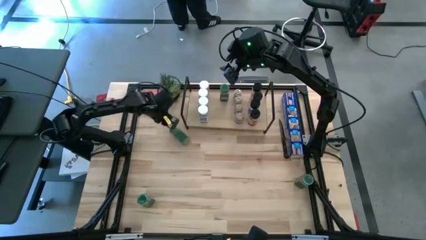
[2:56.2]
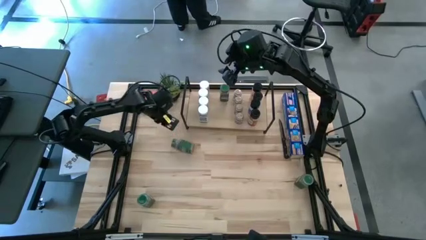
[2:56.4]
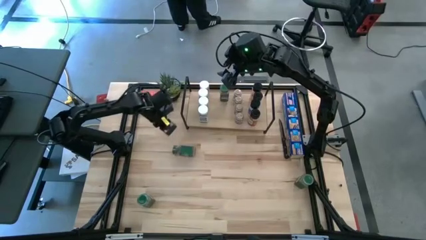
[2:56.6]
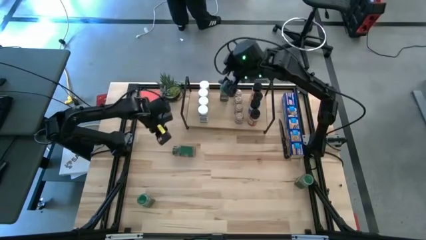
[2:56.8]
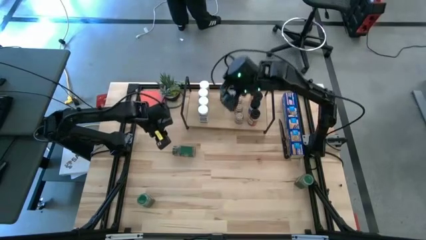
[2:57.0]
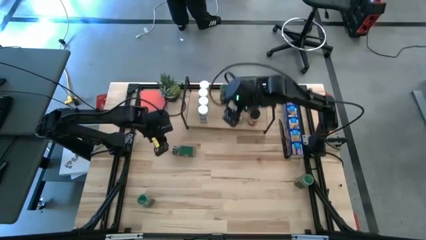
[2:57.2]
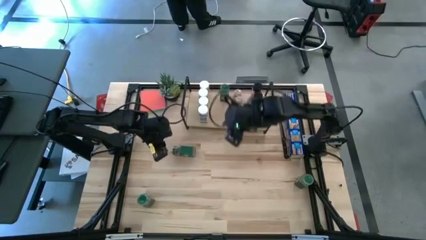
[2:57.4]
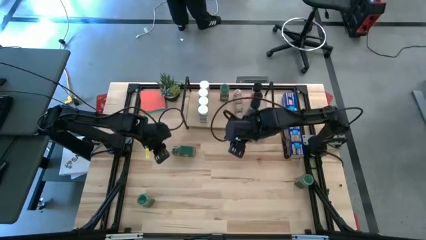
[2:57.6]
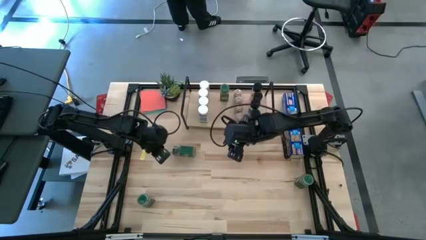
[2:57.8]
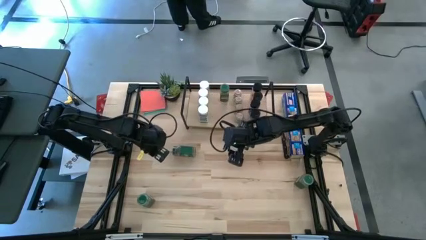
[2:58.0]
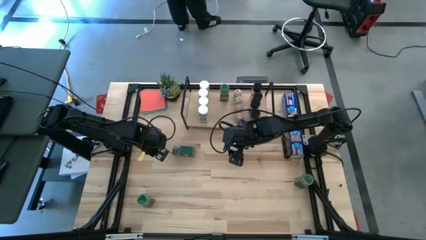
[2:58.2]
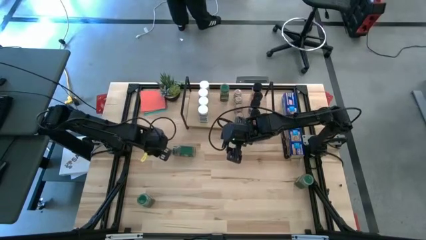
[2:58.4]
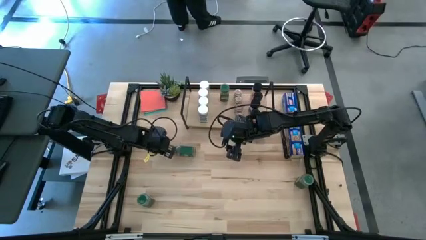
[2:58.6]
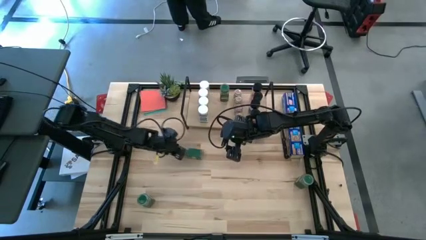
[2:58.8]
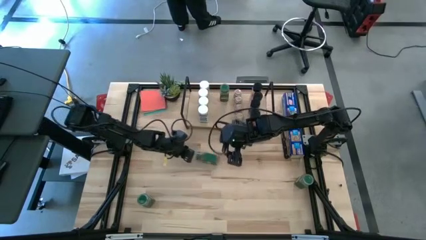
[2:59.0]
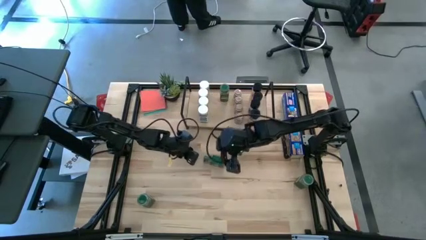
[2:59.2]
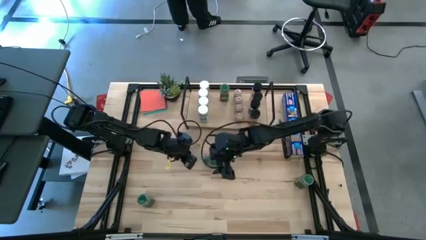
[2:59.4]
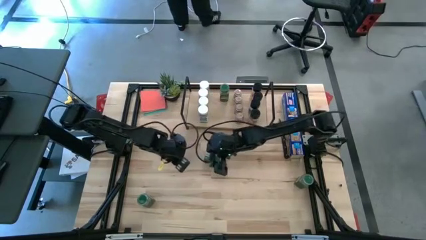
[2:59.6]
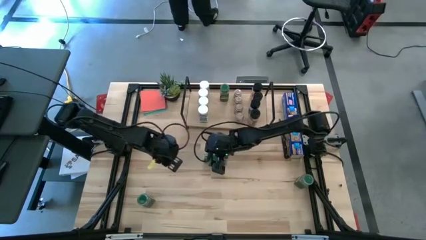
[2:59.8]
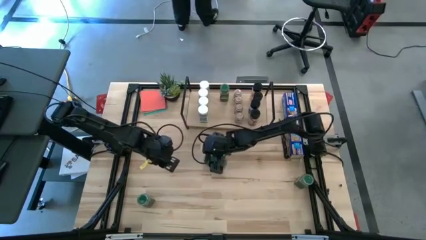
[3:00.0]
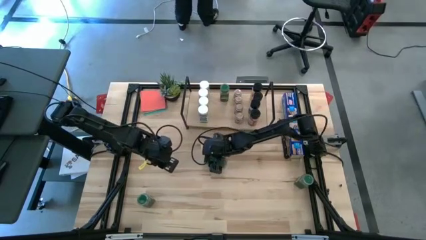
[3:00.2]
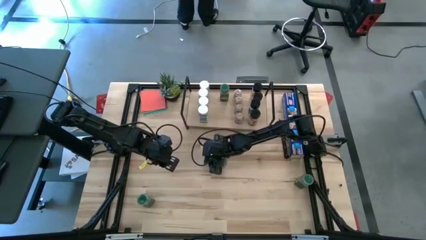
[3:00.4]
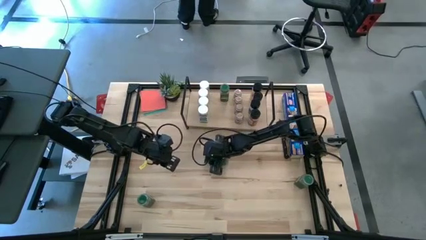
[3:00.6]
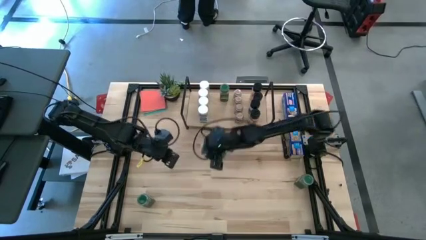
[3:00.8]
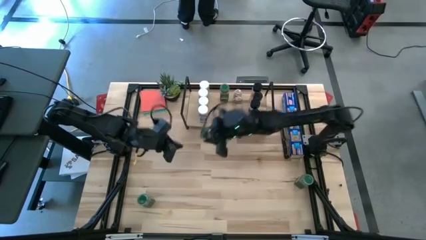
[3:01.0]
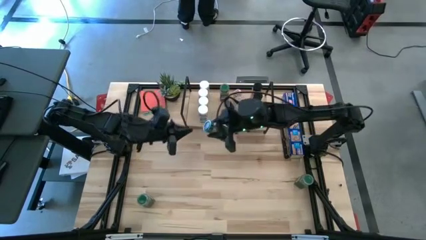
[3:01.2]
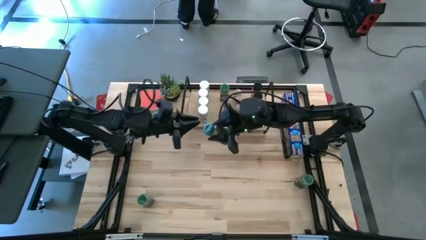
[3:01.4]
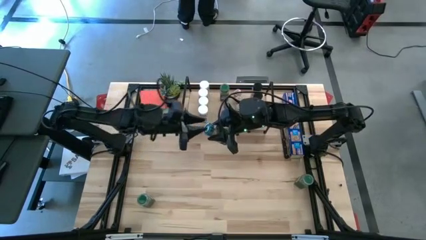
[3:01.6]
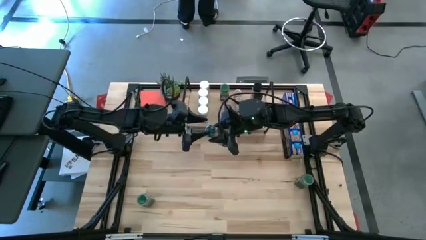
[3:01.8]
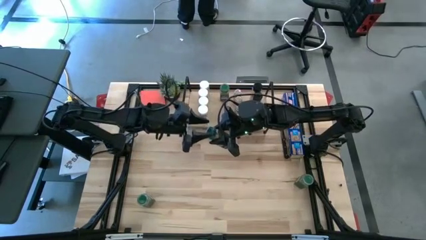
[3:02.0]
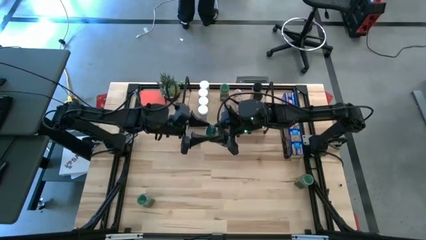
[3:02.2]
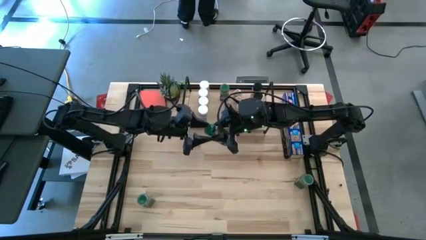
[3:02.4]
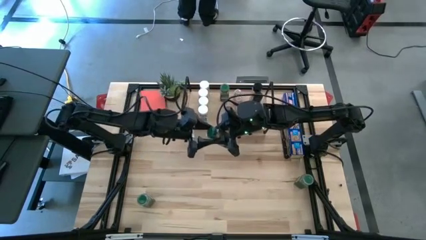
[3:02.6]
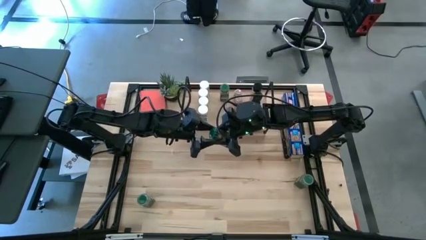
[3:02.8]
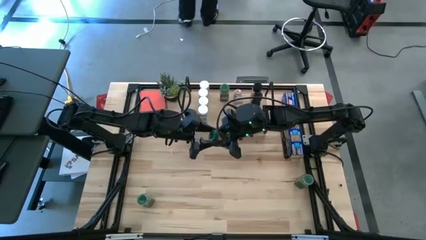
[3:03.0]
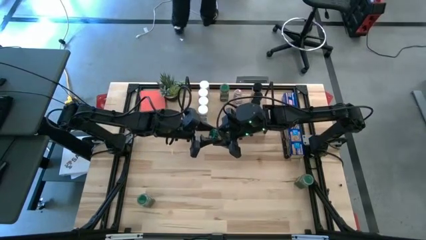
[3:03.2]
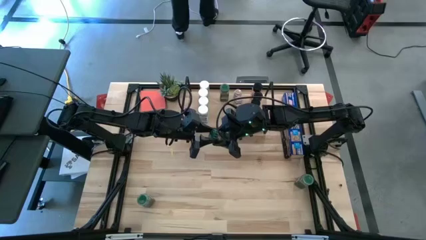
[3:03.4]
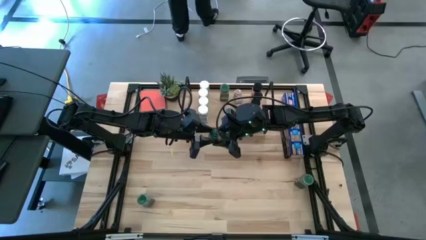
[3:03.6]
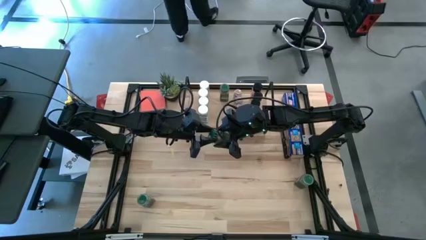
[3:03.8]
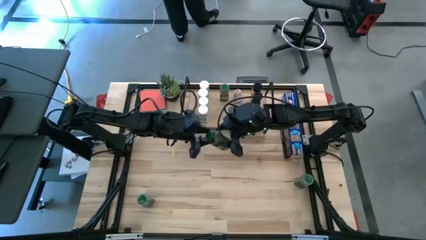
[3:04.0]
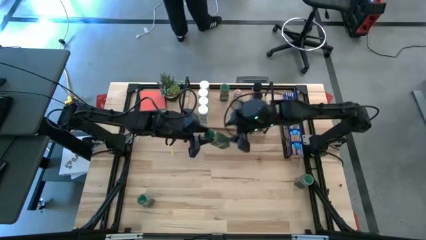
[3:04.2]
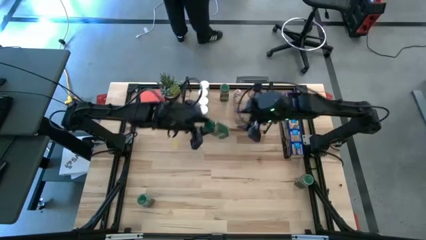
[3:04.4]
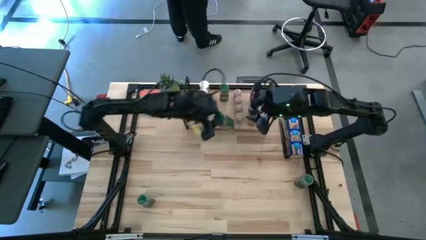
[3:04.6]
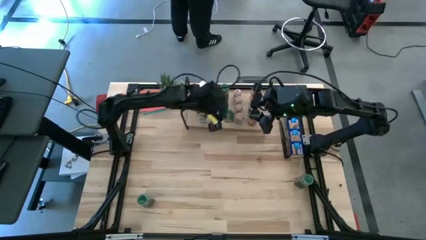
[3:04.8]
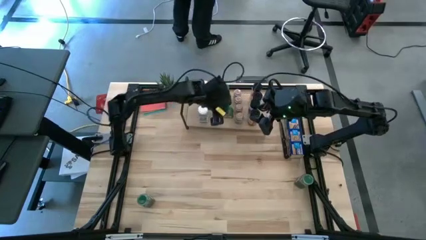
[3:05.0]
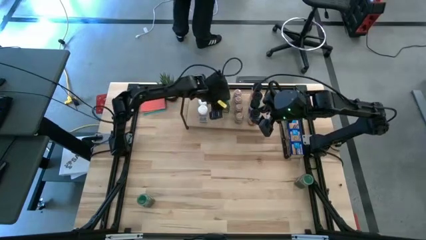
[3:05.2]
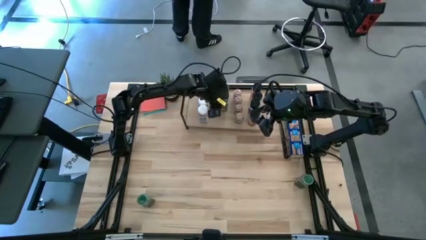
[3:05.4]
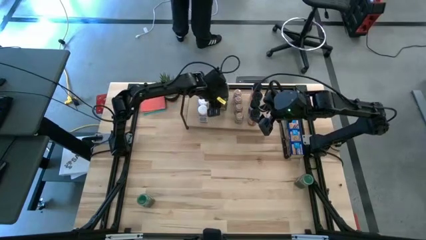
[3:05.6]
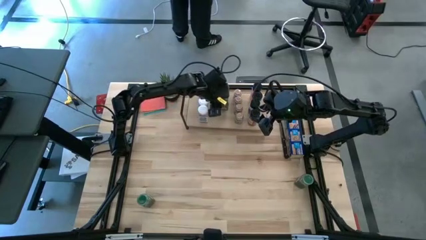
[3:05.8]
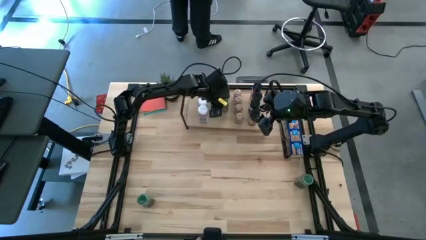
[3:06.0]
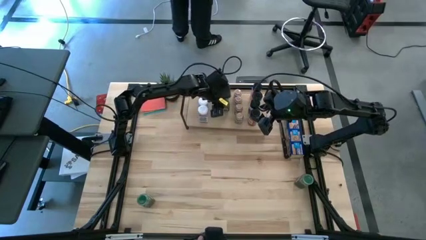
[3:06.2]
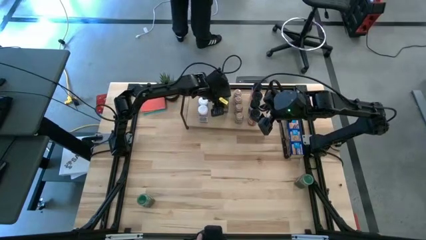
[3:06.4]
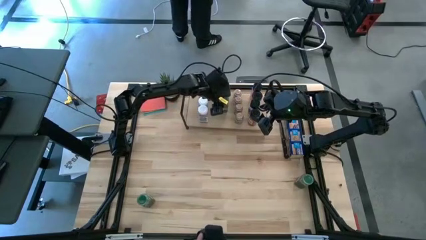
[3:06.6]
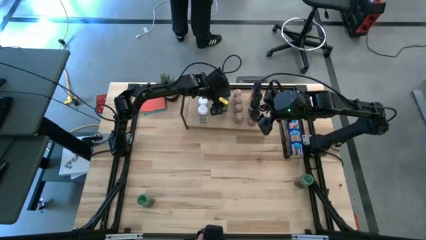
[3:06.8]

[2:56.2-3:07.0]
Task: Shelf spices
Put the green seasoning bottle on the shelf, aligned with the other green bottle

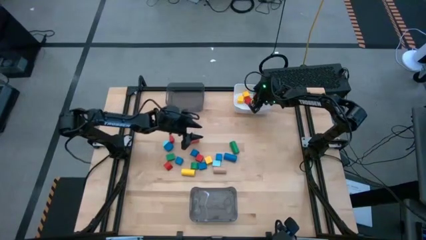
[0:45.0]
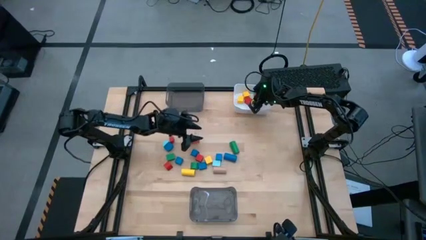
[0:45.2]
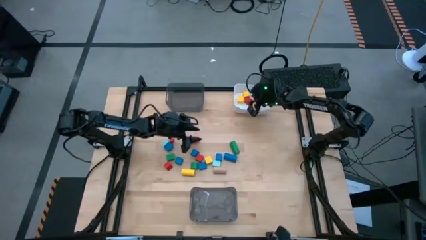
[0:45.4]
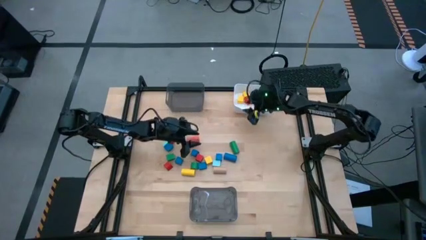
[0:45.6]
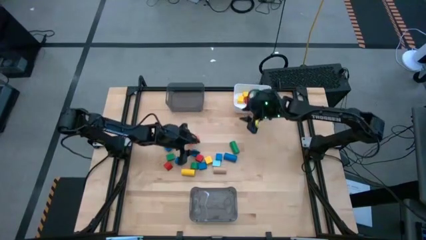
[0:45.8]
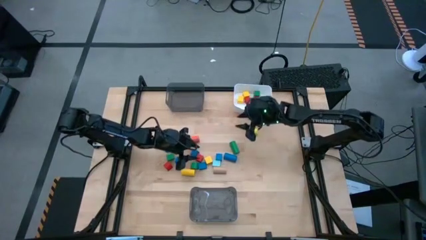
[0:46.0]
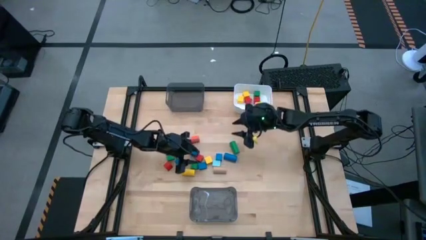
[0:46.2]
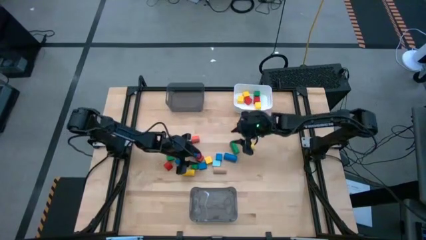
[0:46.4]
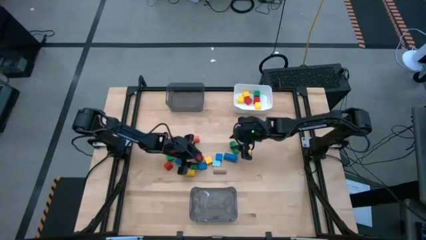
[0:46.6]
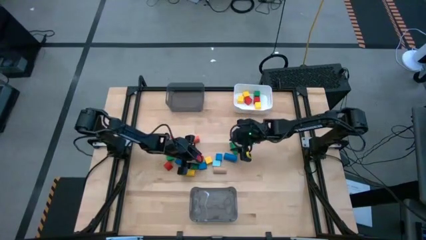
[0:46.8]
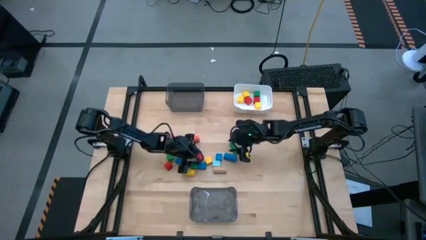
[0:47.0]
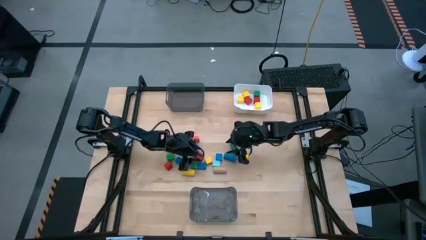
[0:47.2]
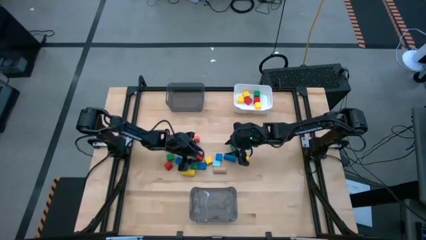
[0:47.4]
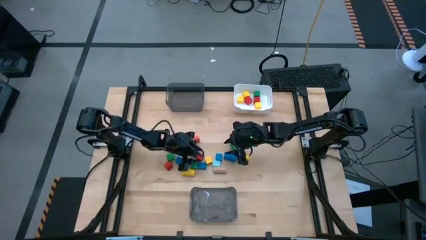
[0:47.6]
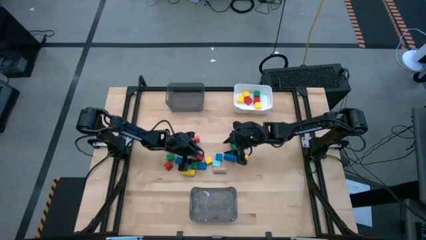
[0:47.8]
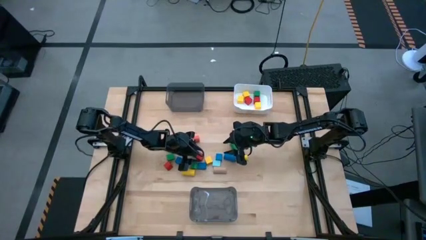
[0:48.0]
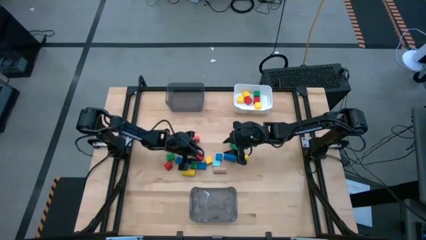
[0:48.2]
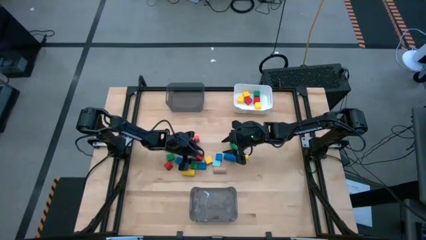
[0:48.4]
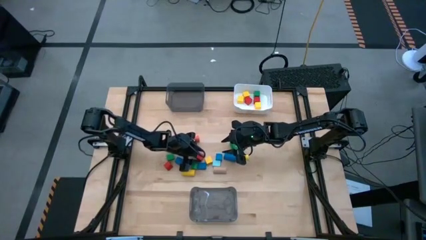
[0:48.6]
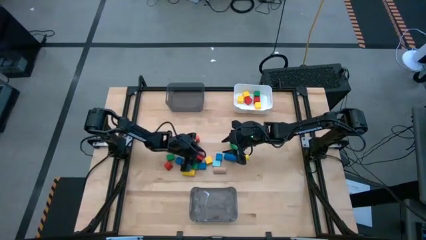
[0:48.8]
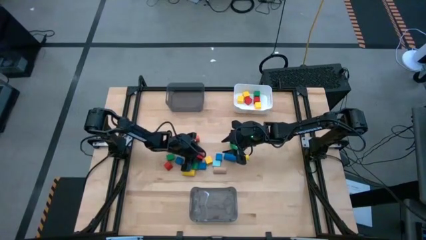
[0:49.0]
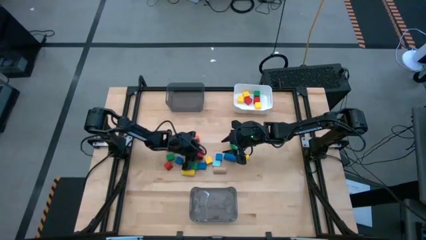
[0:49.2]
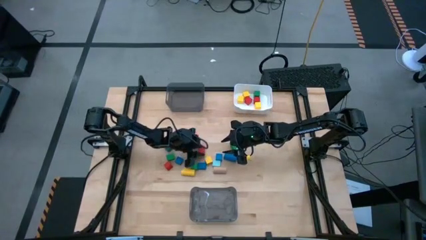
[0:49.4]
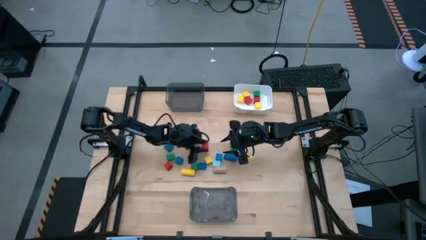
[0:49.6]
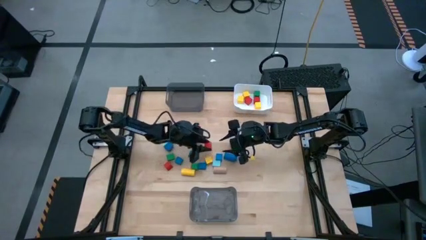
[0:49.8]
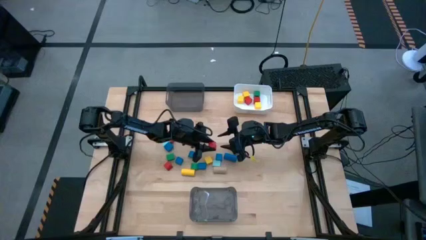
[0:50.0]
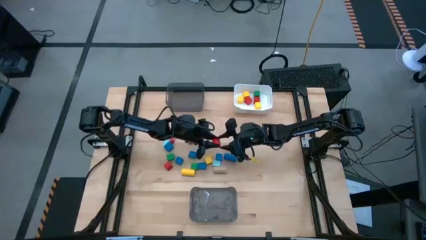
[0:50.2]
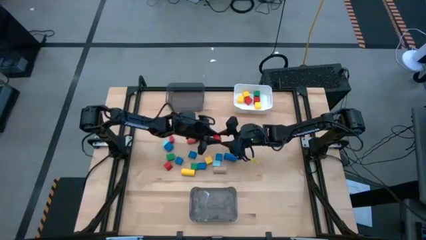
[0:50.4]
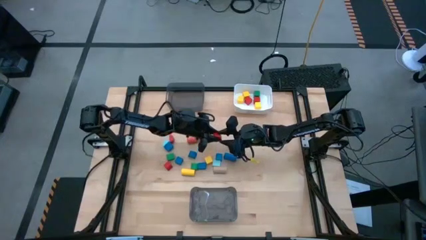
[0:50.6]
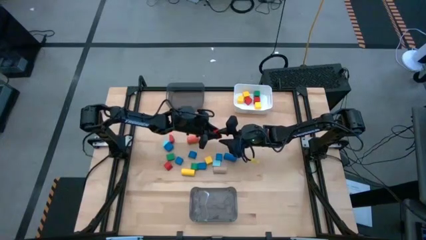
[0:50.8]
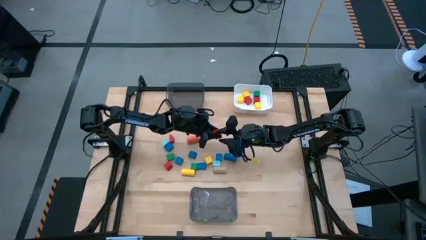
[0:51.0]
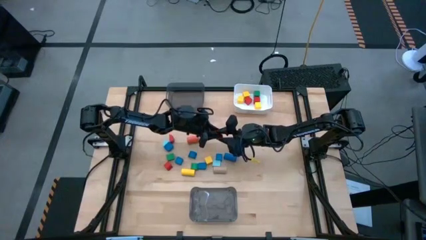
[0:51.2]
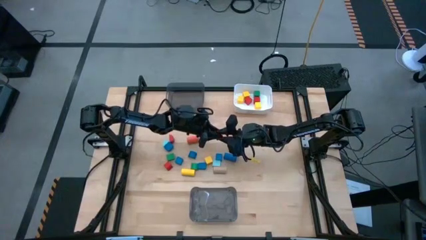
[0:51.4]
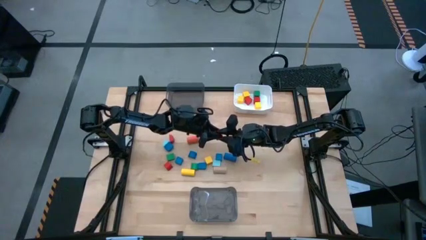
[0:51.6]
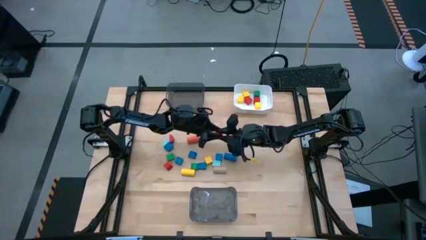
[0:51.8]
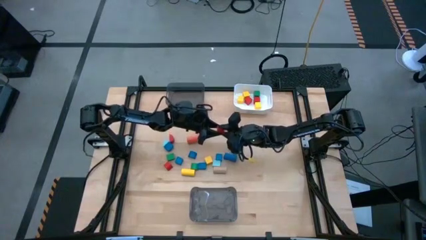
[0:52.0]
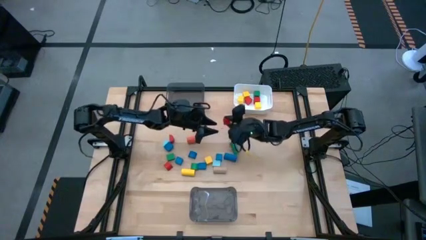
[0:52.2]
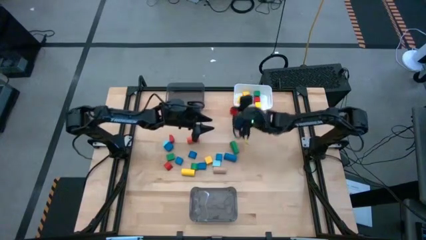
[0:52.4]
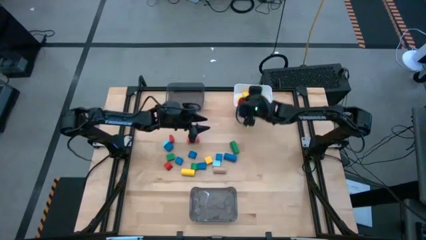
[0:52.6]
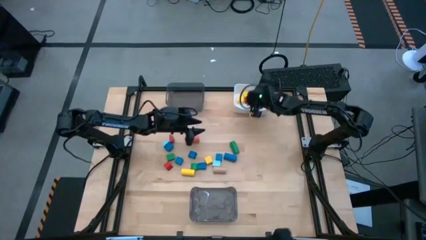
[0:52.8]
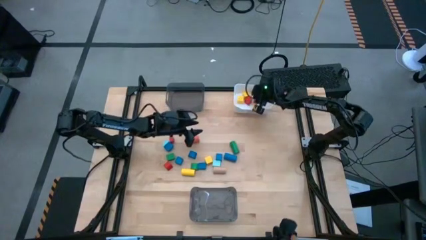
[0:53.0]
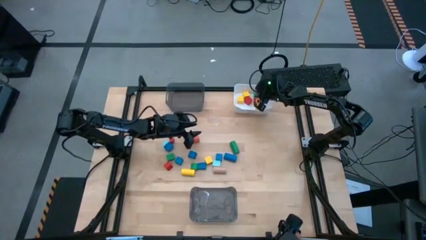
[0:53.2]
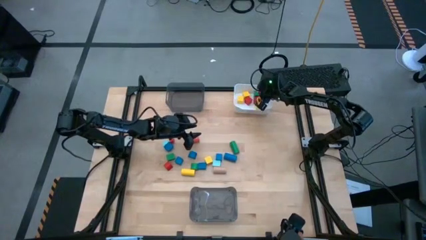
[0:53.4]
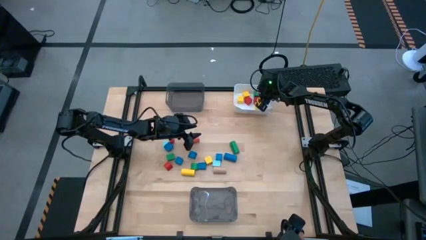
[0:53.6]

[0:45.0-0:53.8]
Task: Sort blocks by size
Put the red square block into the white bin
